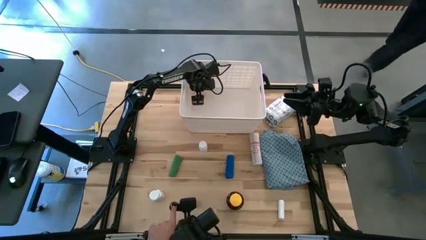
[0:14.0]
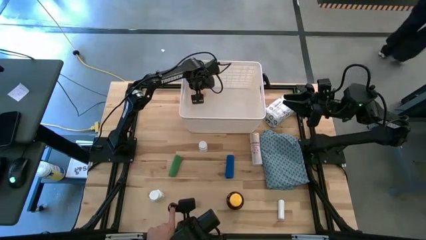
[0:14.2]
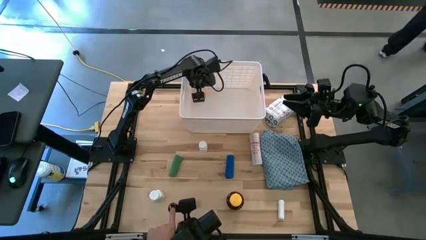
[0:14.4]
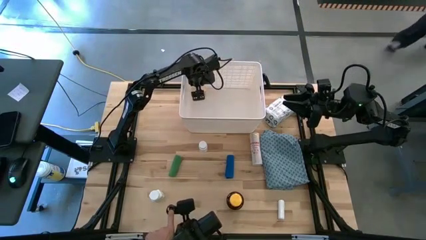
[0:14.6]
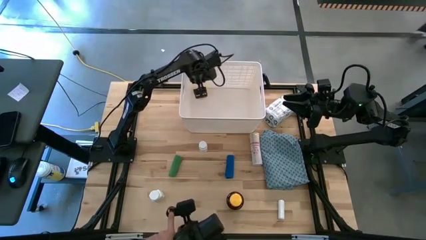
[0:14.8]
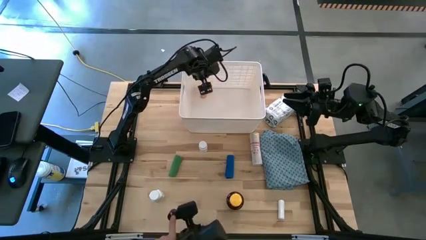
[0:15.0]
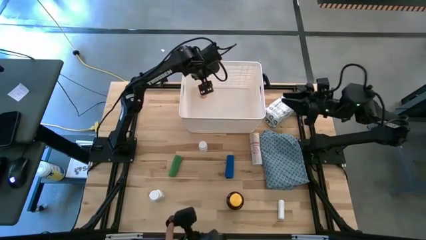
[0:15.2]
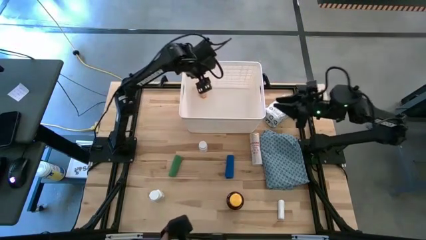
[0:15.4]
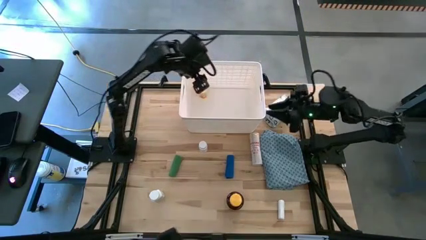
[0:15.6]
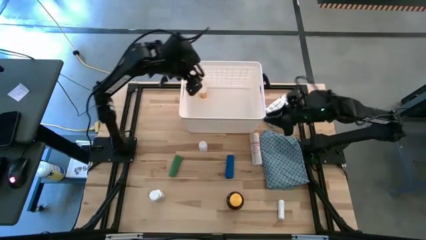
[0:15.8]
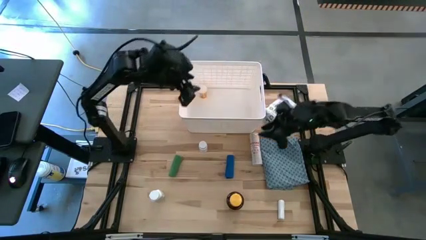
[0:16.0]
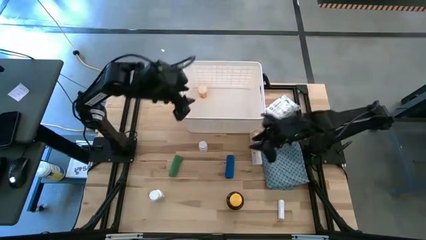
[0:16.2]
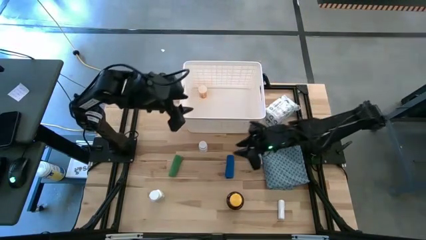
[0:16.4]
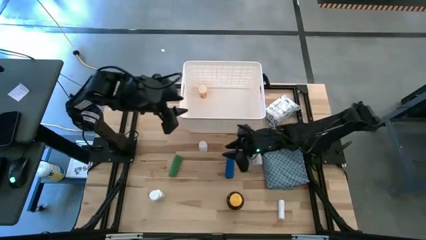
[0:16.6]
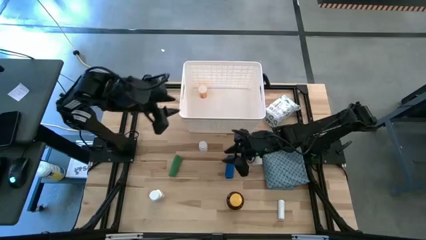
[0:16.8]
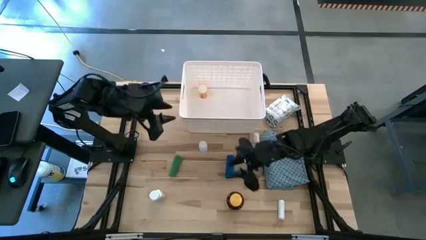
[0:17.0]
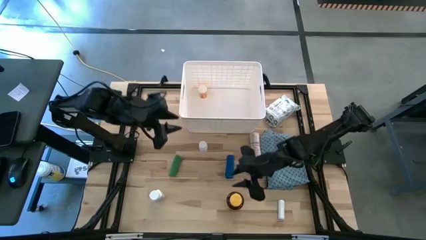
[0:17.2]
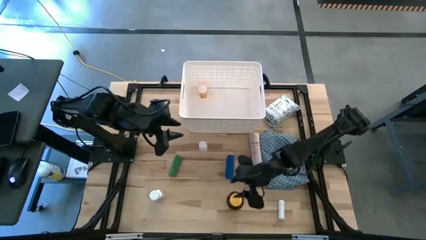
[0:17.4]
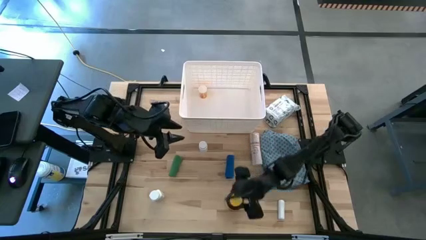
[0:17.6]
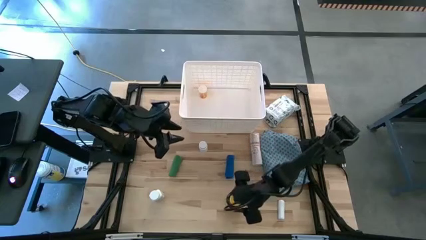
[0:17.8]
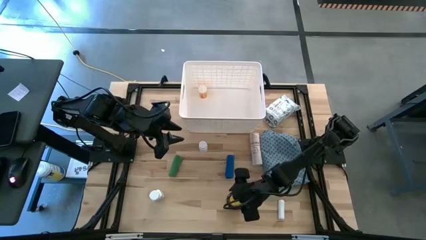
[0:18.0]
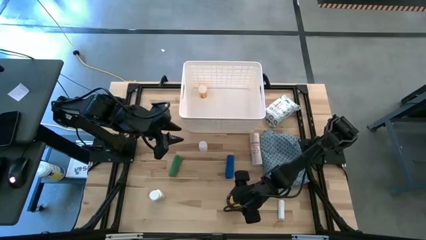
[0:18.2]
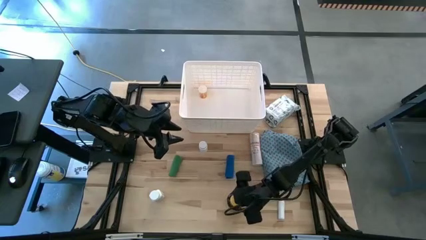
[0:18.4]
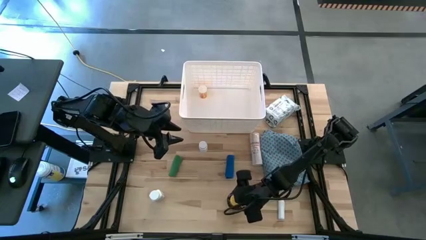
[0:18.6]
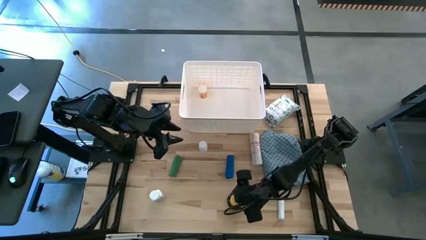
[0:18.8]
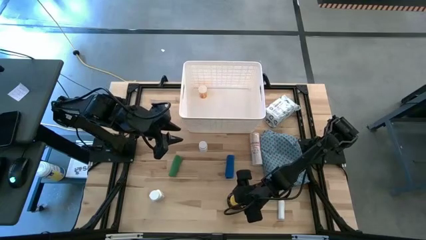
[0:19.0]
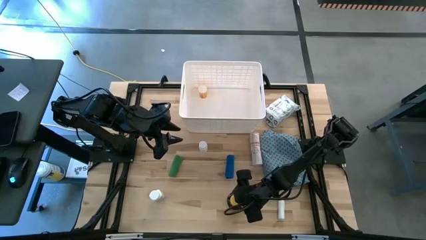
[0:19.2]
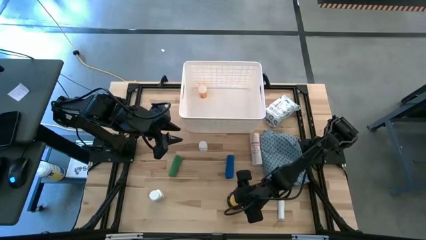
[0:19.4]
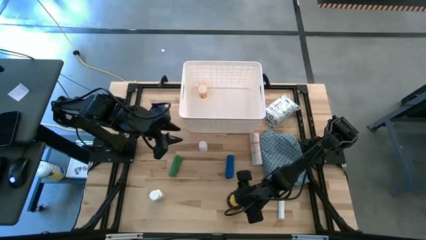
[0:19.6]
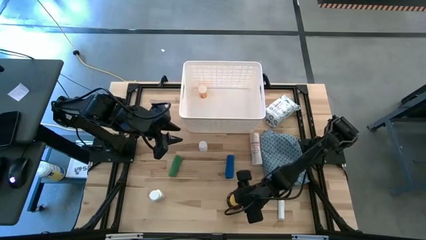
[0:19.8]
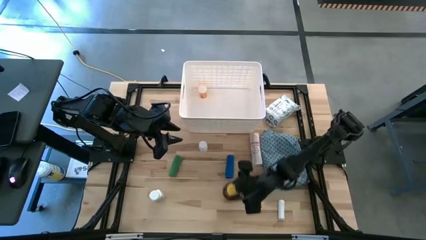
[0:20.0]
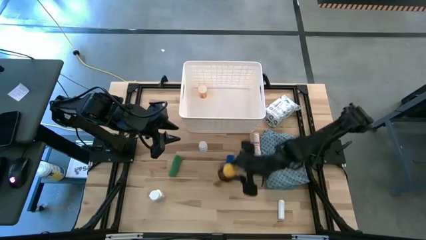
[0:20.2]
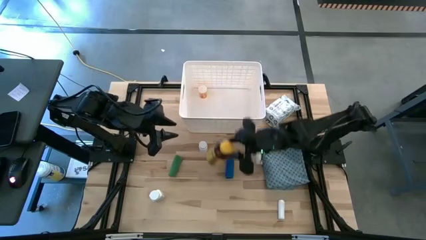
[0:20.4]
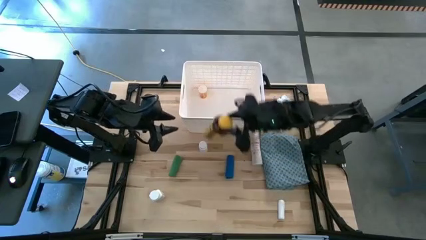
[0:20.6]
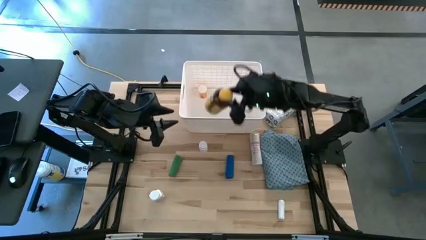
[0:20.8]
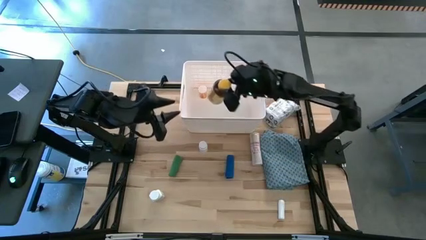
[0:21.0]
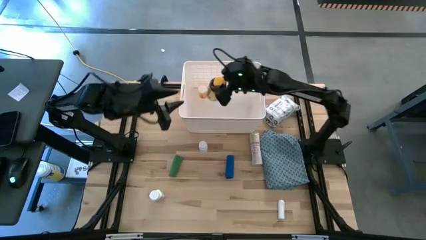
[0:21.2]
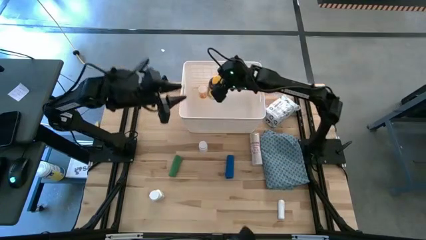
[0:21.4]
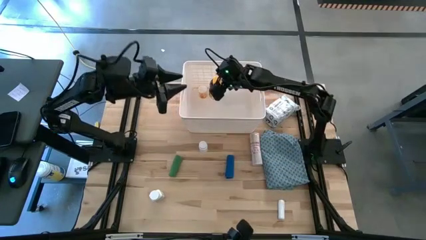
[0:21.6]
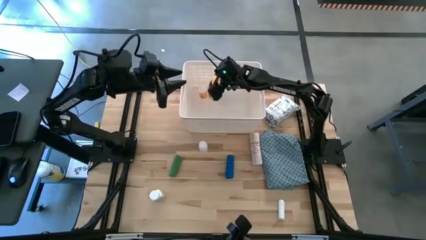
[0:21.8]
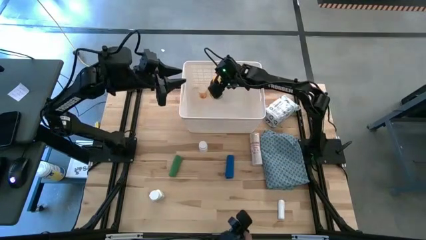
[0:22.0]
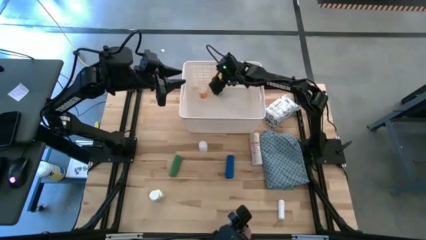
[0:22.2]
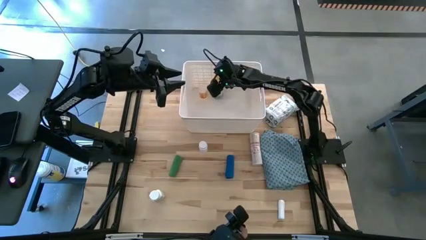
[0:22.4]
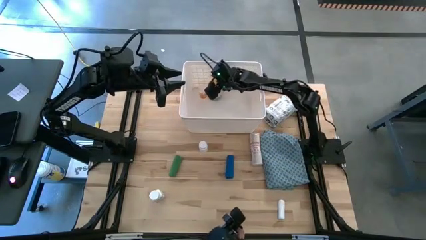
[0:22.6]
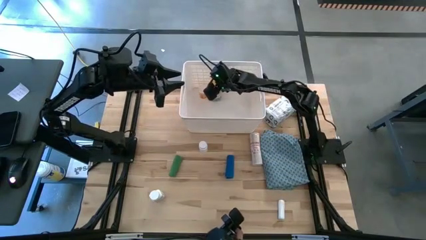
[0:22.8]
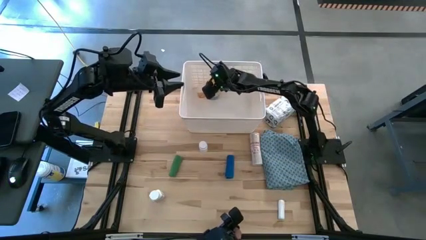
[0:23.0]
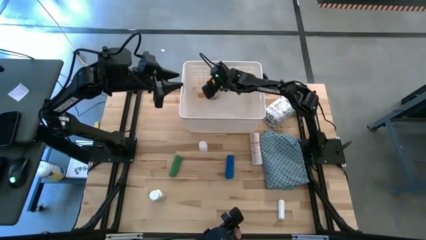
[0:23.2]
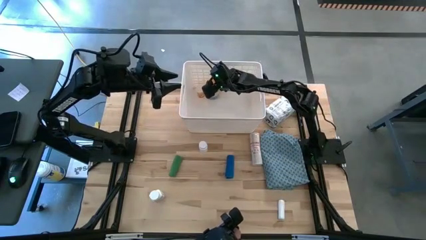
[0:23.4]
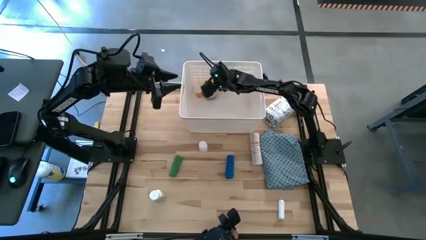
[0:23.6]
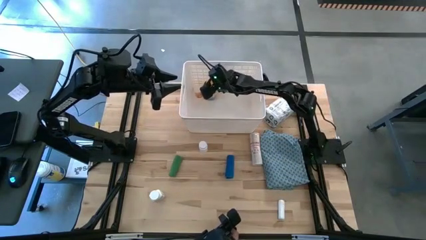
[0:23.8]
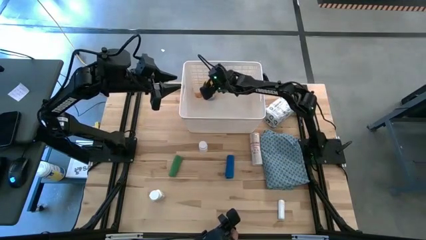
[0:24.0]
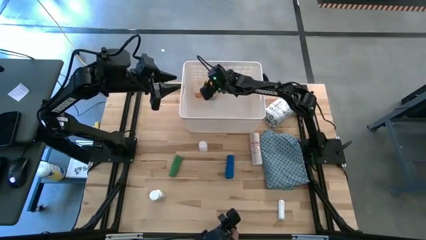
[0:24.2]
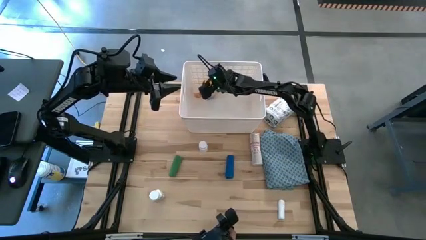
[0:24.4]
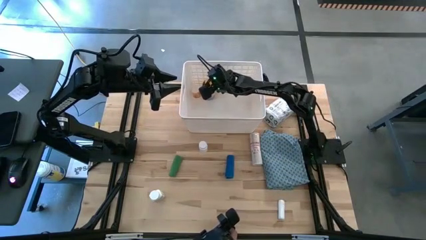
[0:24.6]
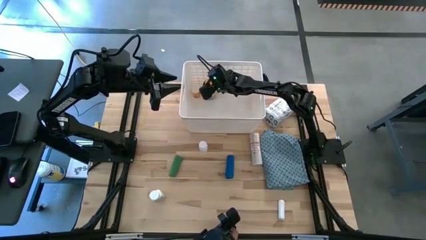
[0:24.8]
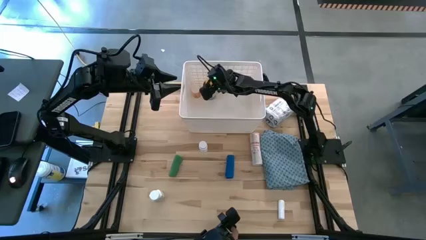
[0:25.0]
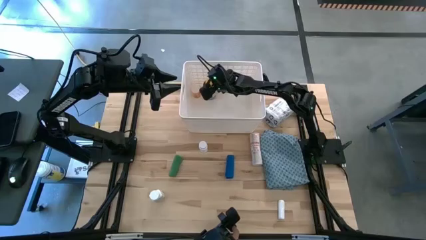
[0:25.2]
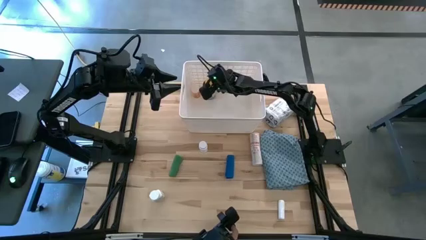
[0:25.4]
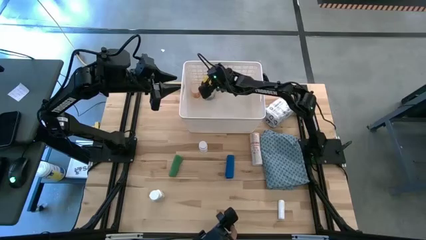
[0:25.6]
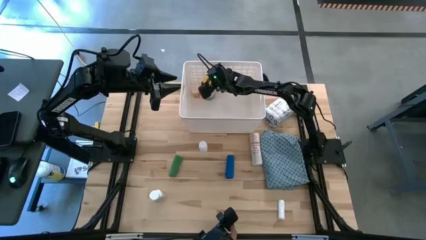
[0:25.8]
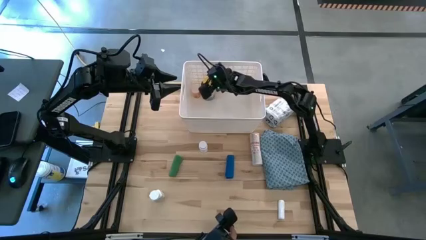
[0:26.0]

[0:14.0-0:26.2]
Task: Pick & place medical supplies in basket/bin
Put the yellow medicine bottle into the white bin
